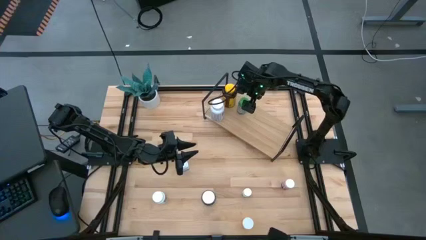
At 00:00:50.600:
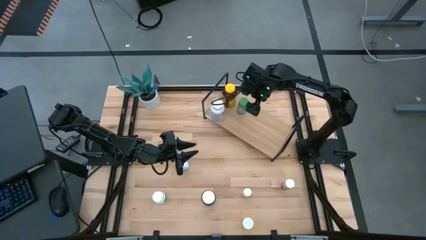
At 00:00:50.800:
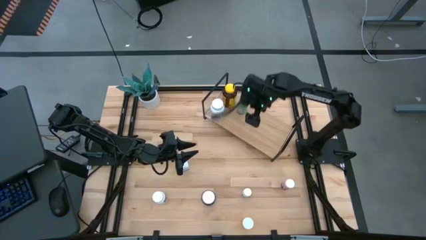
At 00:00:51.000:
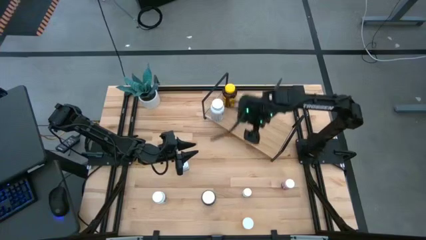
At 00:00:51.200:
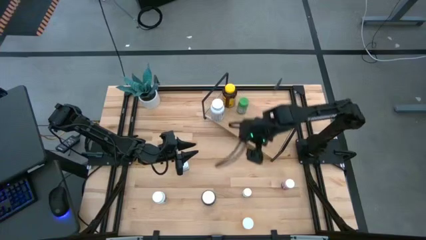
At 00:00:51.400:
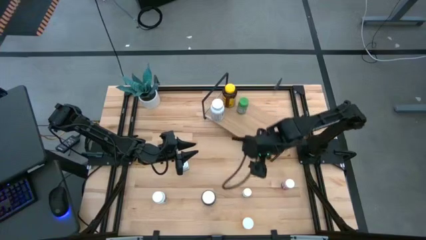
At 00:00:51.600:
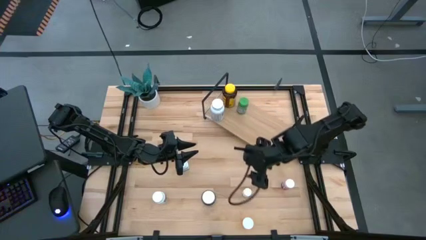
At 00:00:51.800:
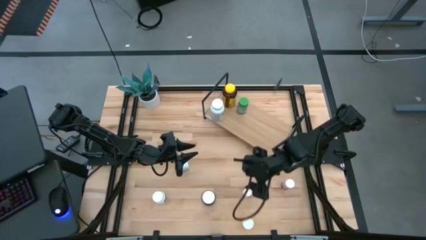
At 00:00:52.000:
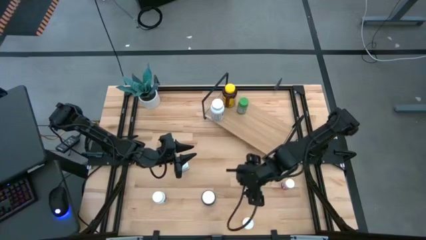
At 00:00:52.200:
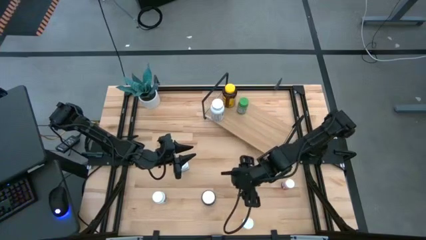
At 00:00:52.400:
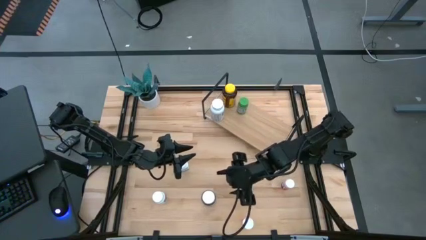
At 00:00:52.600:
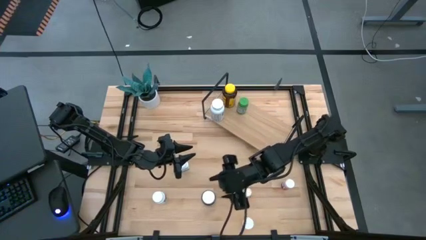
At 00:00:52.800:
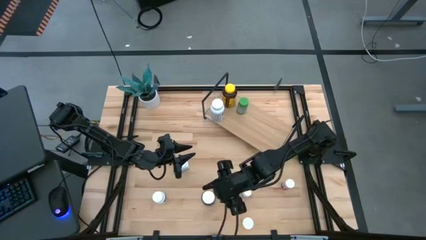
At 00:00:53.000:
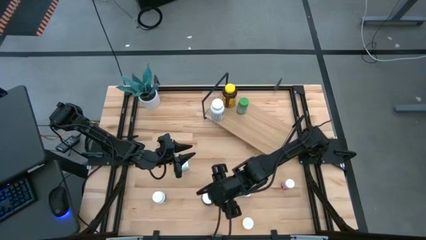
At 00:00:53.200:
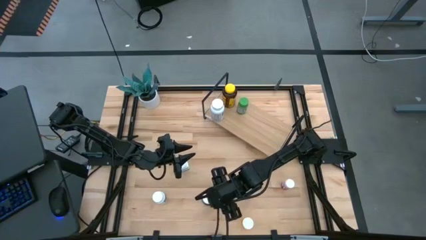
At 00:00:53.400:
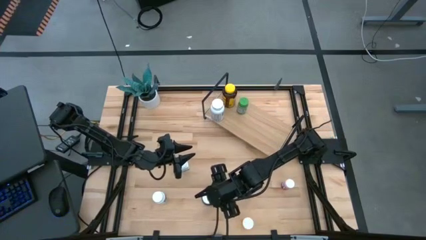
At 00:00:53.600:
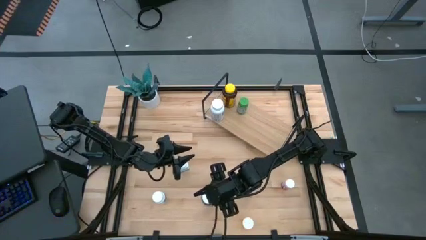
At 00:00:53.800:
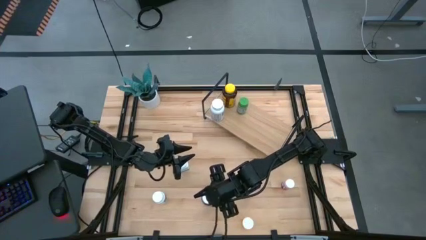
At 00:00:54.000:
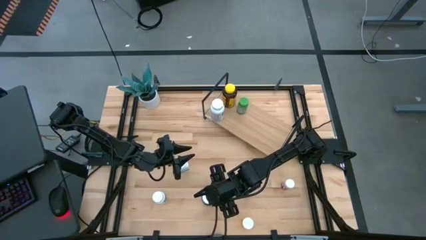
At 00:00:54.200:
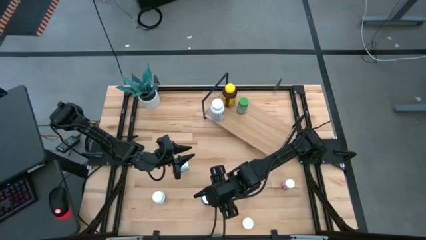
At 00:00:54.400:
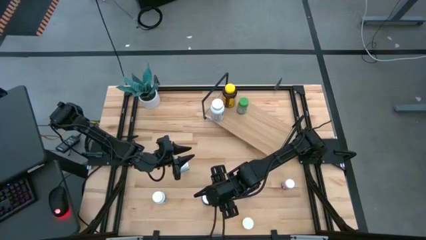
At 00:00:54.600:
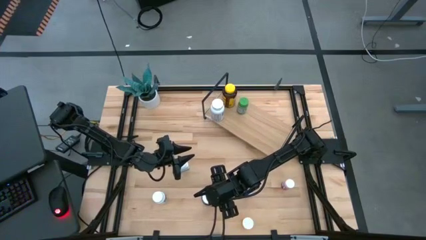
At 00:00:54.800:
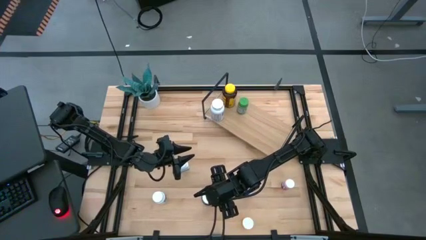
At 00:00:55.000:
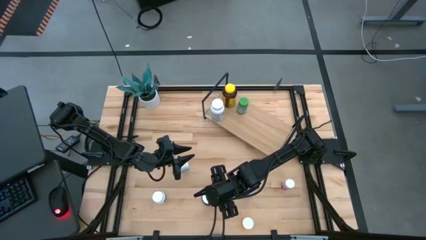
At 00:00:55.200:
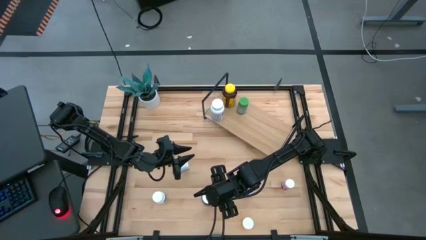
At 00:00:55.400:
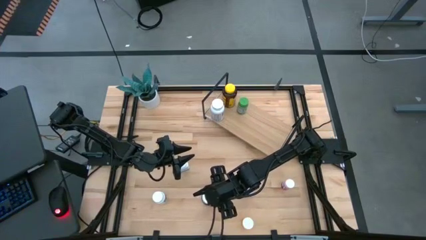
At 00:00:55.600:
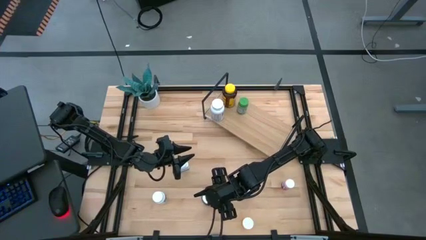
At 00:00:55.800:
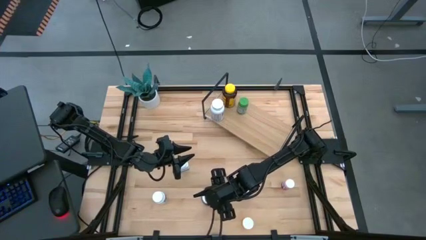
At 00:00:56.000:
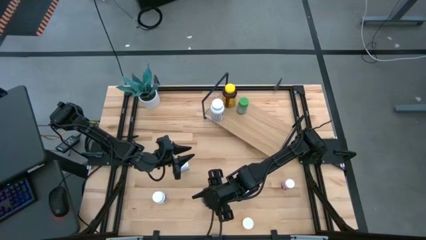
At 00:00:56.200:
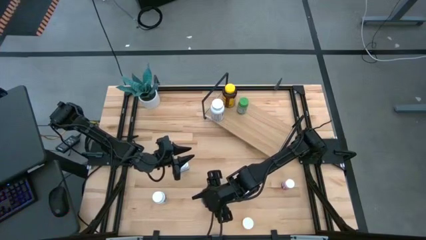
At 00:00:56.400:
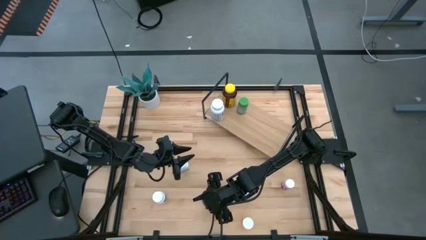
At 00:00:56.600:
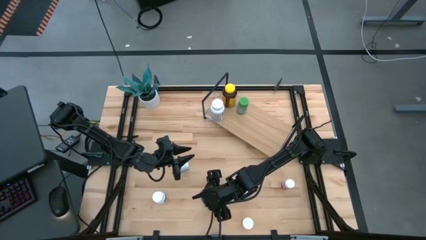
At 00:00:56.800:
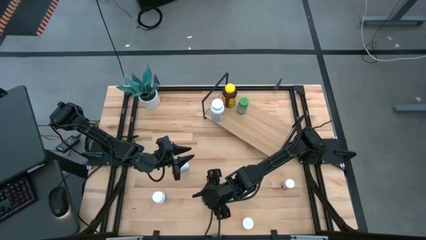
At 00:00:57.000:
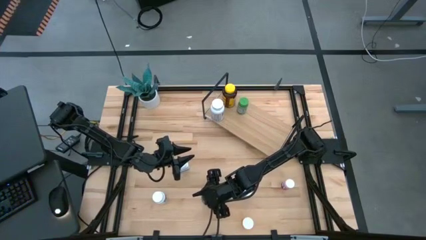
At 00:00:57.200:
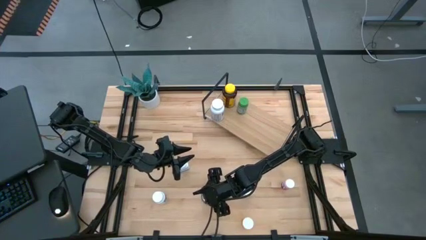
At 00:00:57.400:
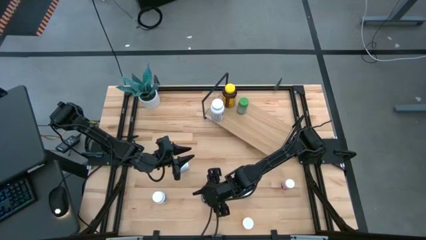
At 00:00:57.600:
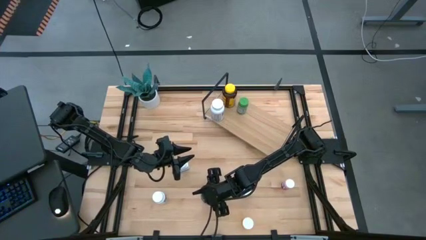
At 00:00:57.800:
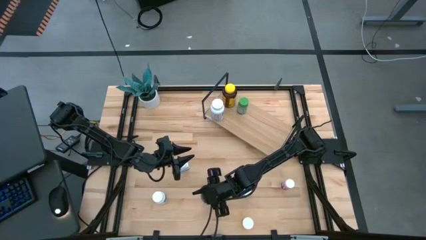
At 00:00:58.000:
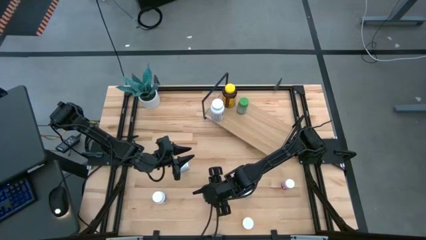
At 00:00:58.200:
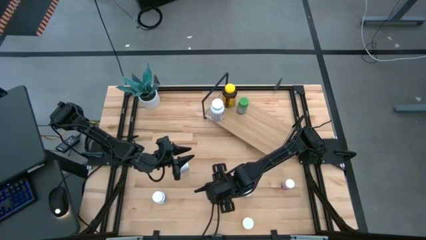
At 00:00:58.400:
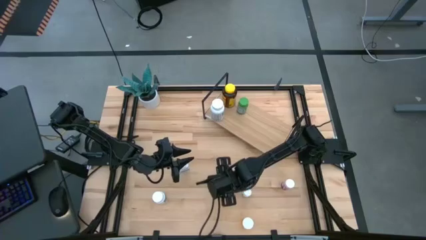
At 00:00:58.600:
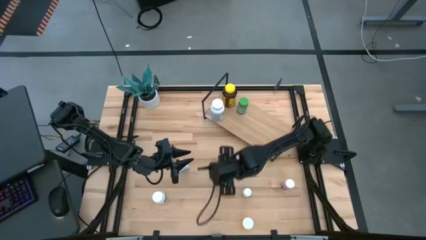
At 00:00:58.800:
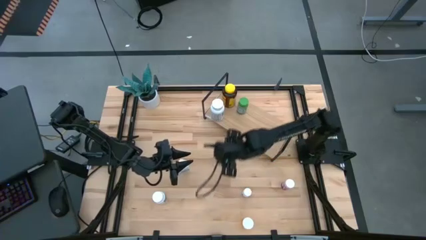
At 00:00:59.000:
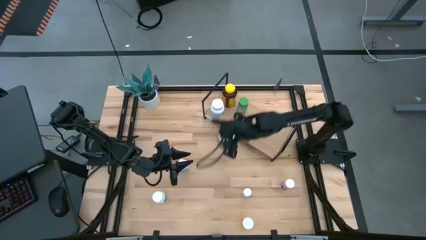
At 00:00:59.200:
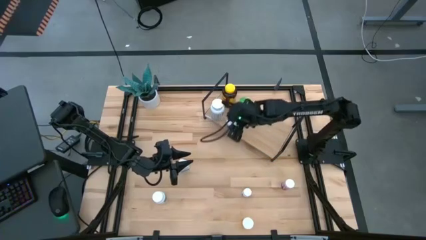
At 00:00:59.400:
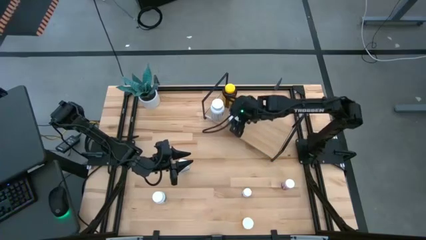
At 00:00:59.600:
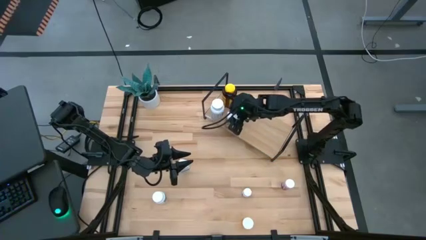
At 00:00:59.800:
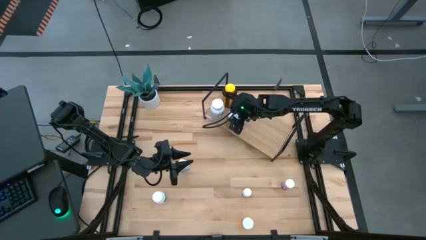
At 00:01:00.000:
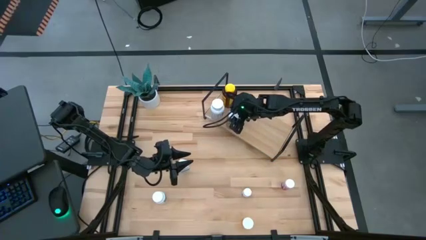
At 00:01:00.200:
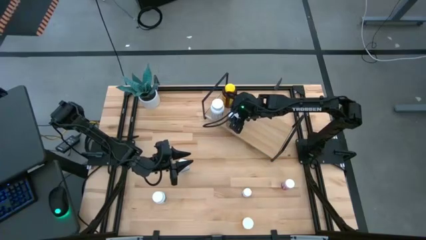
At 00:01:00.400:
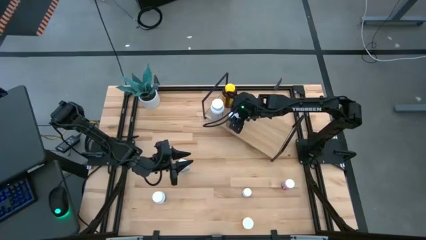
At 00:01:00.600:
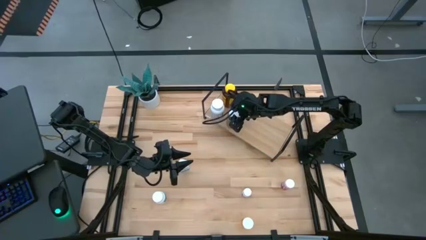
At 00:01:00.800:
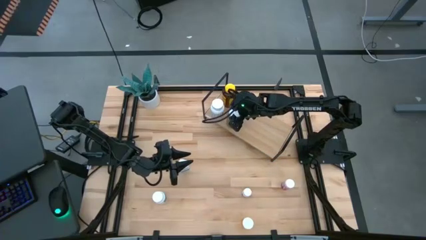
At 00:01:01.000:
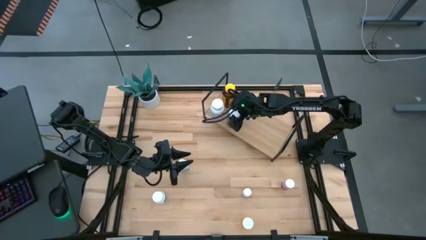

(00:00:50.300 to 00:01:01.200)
Task: Pick and place medicine bottles onto shelf by color
Put the green pill bottle on the shelf

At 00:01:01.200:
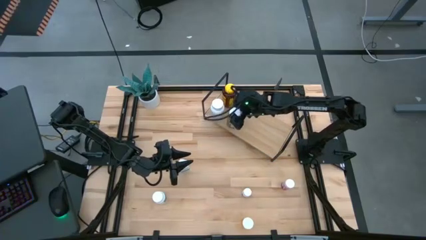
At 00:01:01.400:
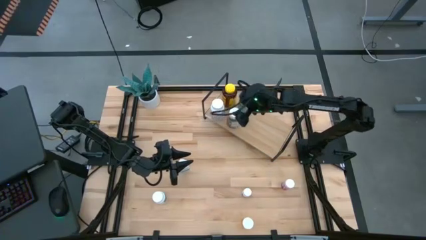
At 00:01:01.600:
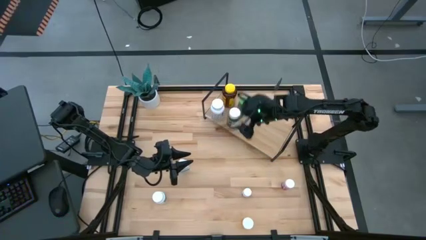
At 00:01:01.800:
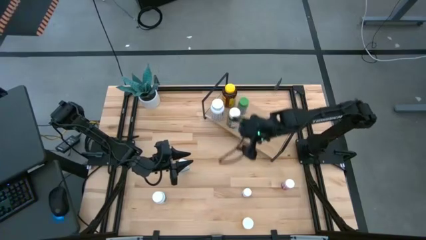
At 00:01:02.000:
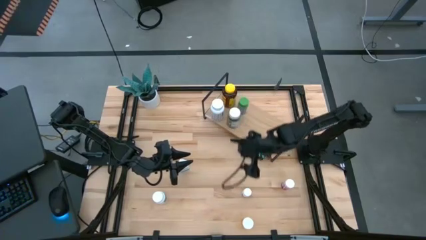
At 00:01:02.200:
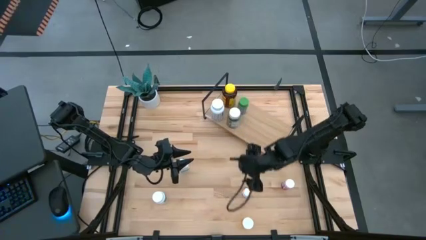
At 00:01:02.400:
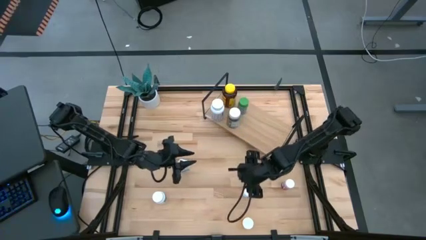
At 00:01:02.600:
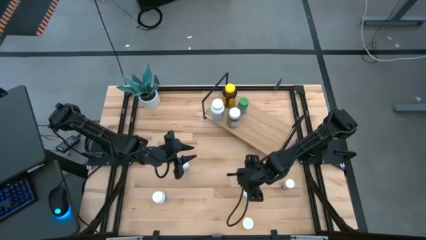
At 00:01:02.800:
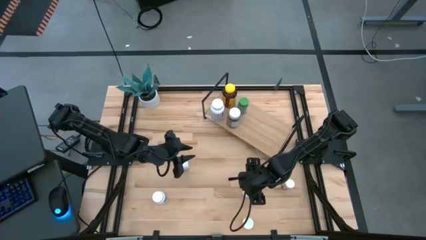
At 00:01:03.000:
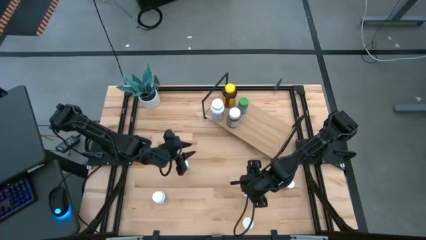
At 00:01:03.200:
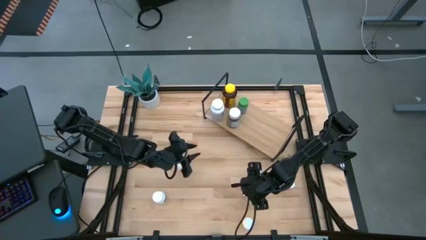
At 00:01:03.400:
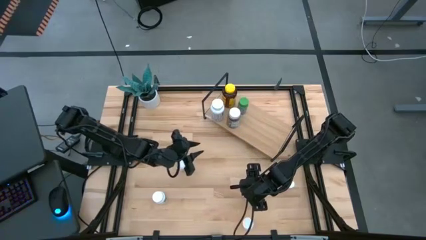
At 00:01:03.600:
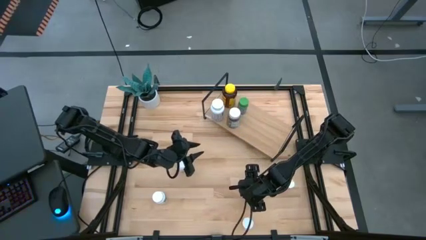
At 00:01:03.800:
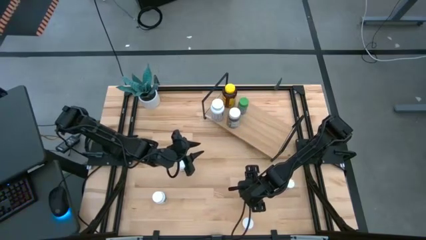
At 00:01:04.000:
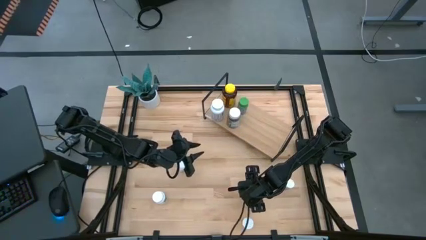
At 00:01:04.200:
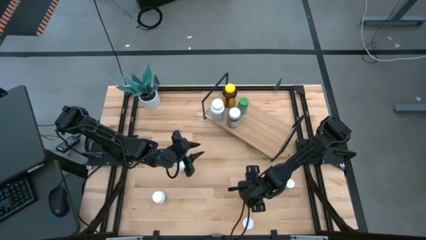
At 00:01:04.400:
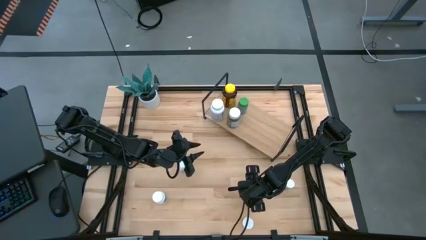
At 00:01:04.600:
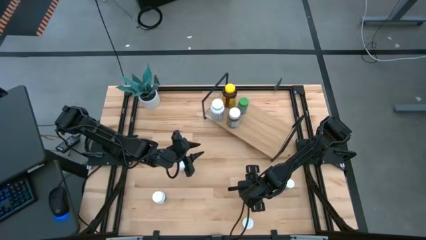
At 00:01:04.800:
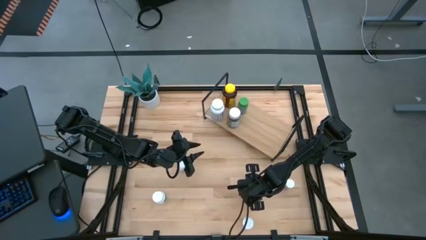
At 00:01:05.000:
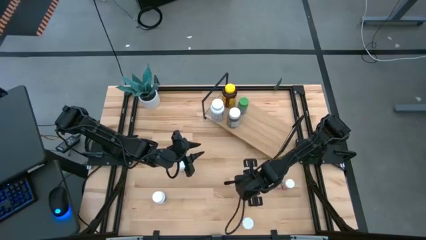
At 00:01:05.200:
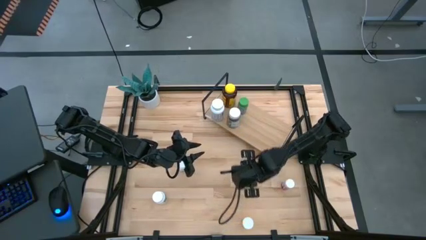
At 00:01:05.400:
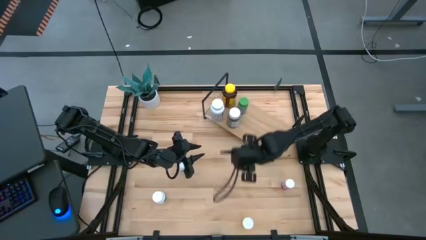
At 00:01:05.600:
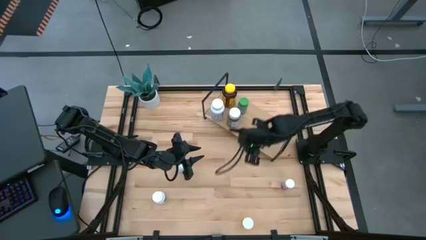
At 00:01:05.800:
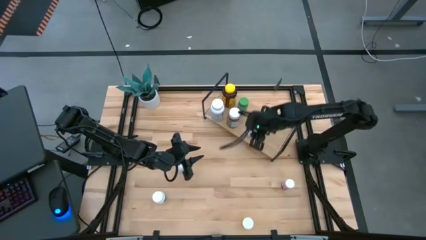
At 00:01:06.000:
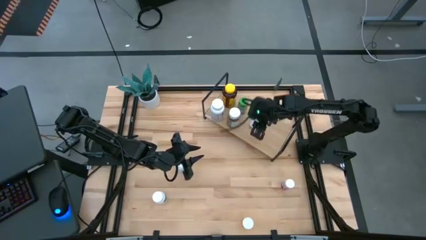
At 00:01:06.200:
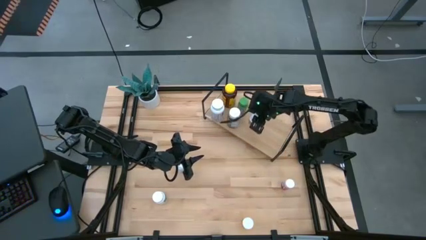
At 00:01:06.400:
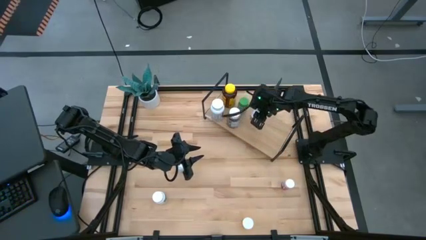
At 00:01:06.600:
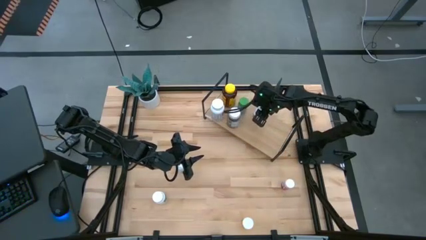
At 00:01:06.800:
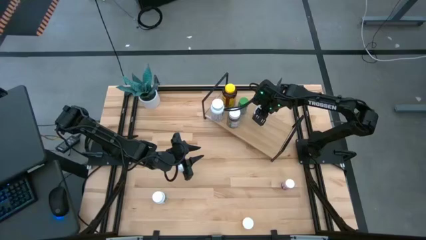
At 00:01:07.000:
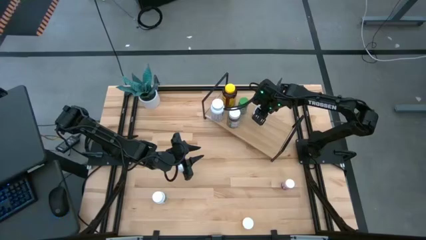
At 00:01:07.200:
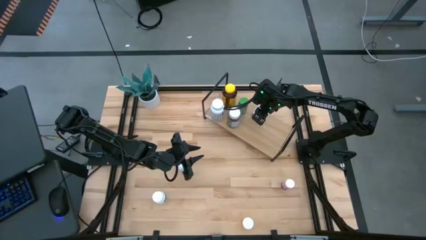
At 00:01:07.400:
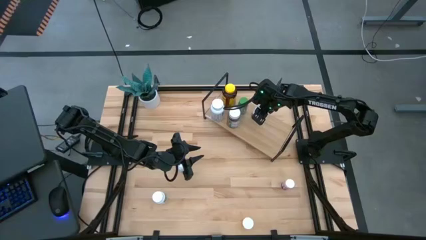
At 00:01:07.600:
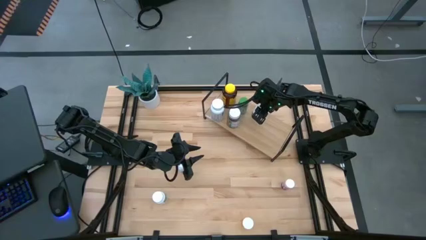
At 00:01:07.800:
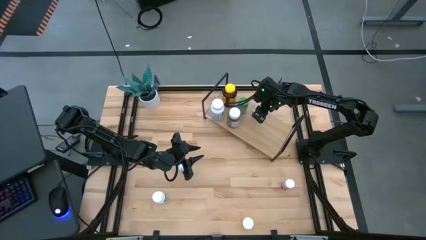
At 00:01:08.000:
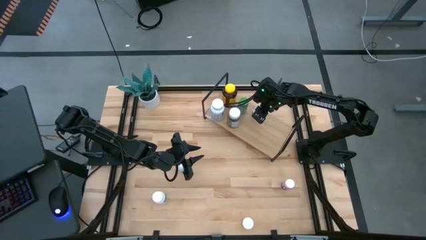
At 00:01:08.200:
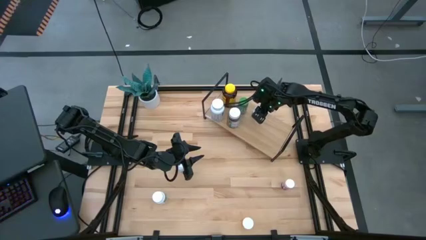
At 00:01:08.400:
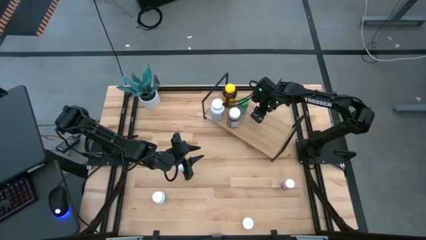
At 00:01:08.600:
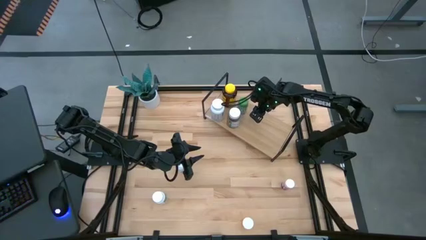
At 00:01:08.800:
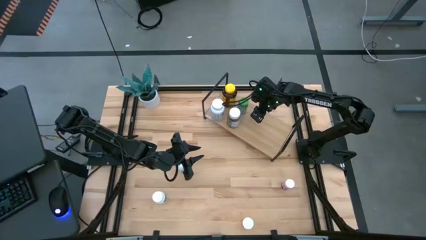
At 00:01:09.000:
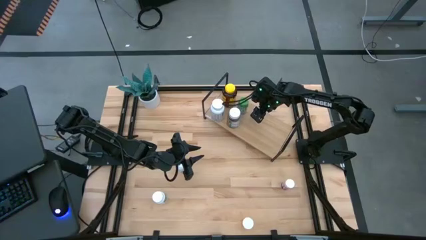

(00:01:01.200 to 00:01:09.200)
Put the white and black pill bottle on the shelf
